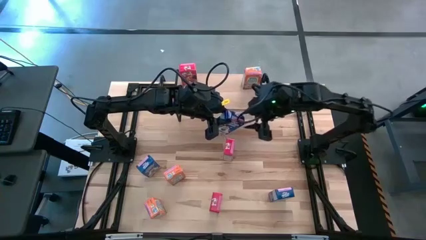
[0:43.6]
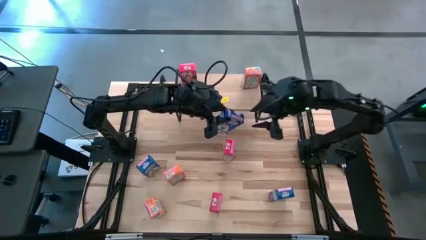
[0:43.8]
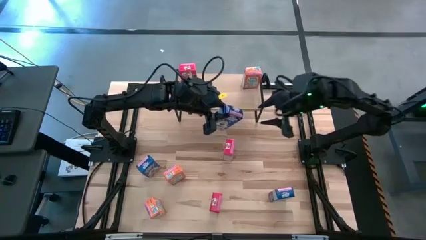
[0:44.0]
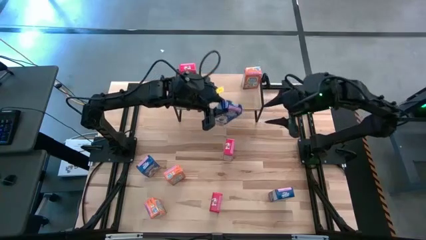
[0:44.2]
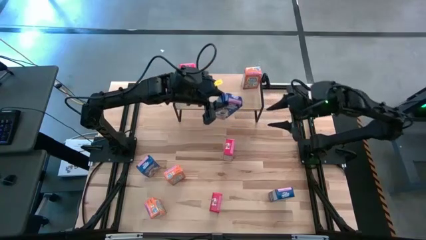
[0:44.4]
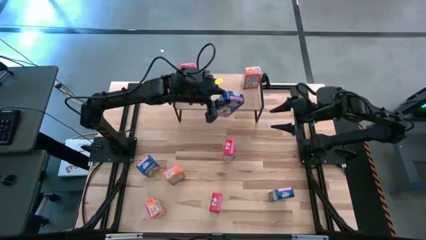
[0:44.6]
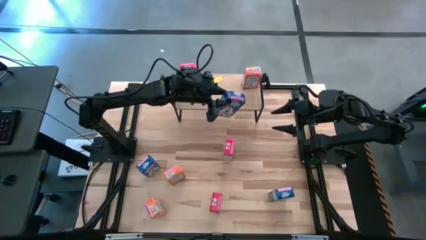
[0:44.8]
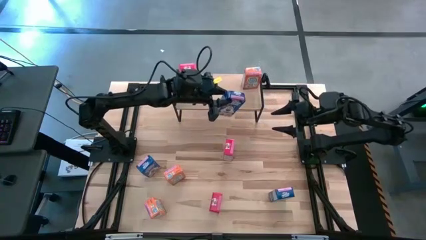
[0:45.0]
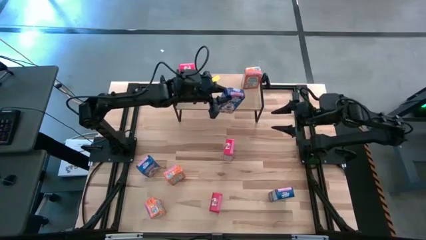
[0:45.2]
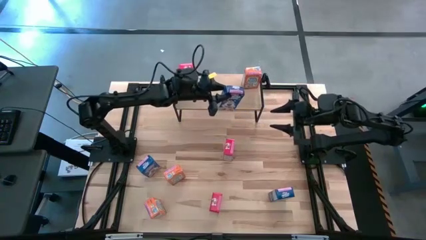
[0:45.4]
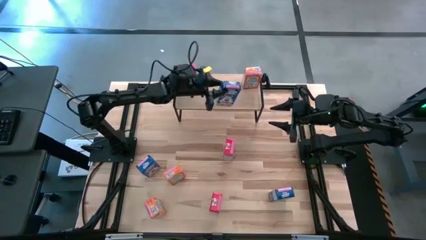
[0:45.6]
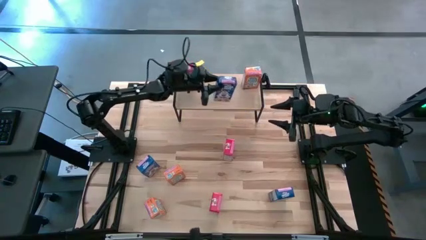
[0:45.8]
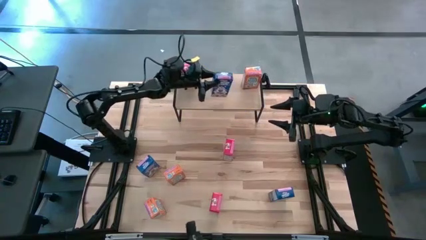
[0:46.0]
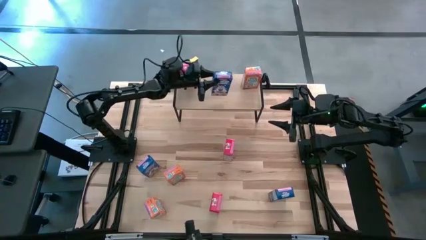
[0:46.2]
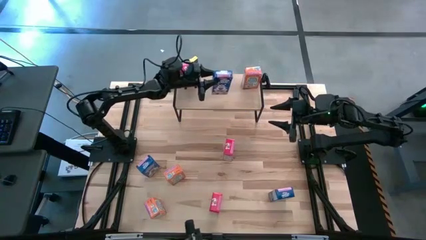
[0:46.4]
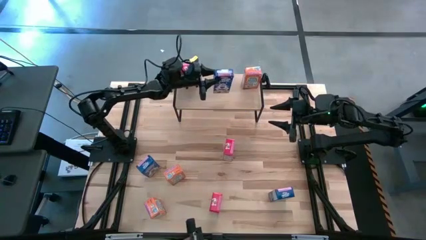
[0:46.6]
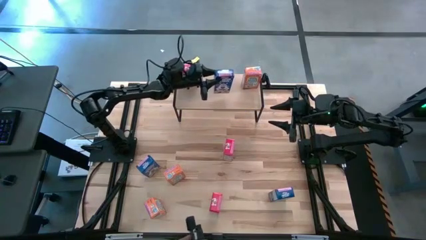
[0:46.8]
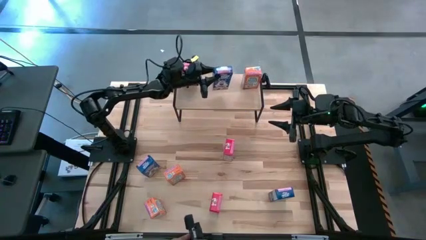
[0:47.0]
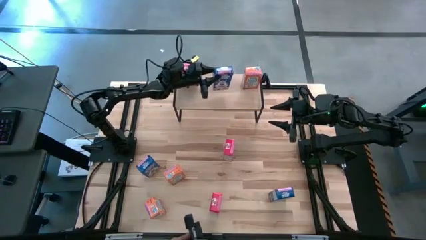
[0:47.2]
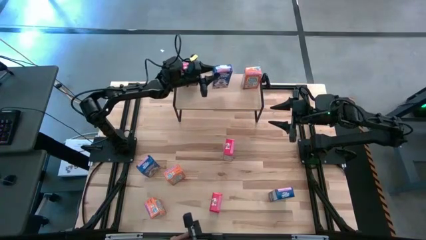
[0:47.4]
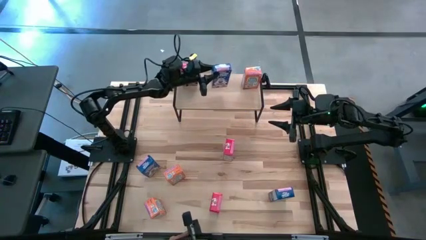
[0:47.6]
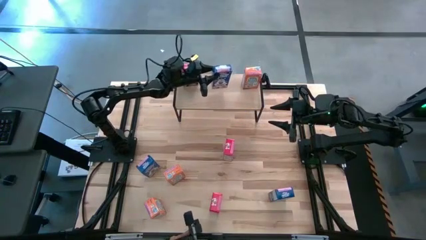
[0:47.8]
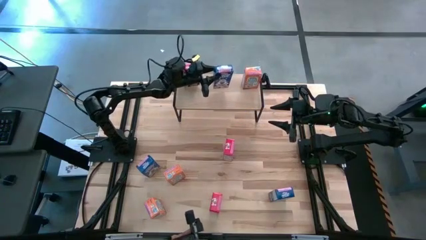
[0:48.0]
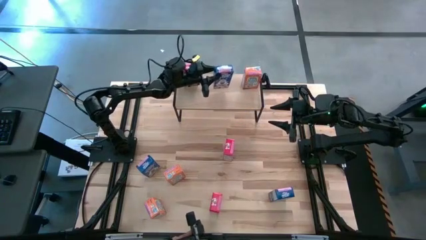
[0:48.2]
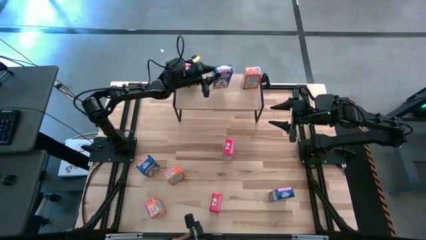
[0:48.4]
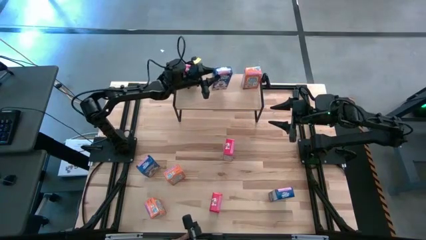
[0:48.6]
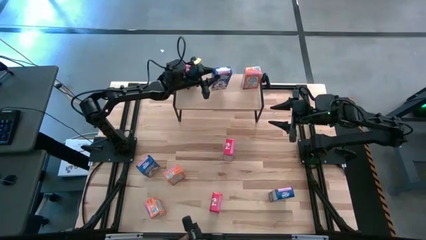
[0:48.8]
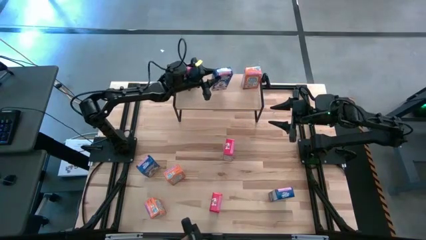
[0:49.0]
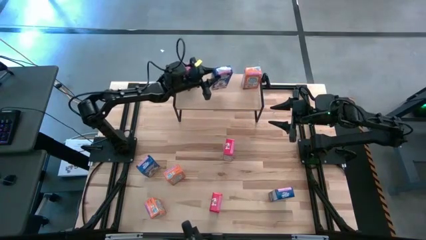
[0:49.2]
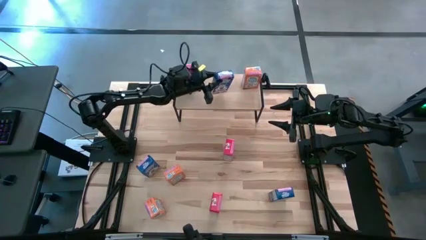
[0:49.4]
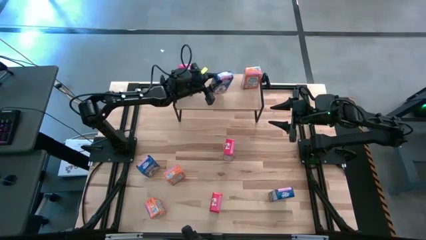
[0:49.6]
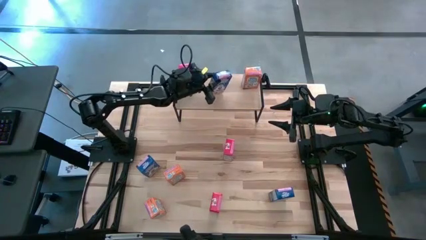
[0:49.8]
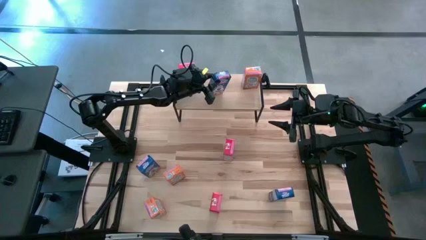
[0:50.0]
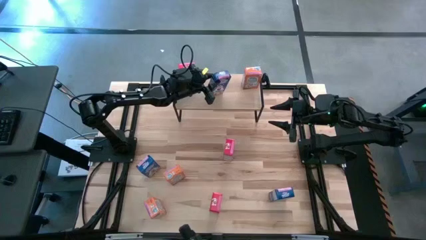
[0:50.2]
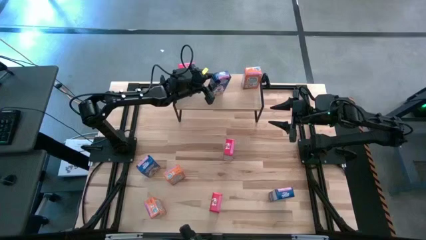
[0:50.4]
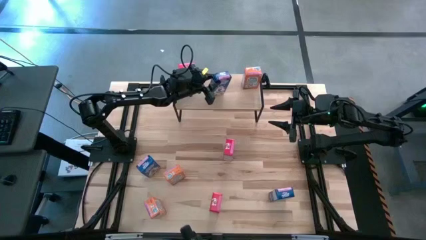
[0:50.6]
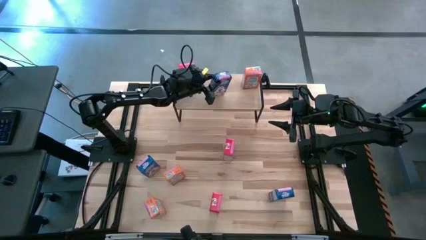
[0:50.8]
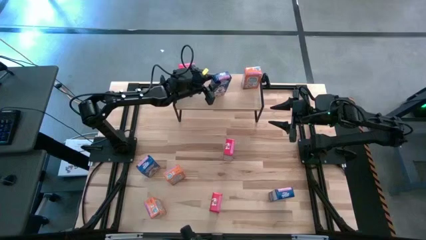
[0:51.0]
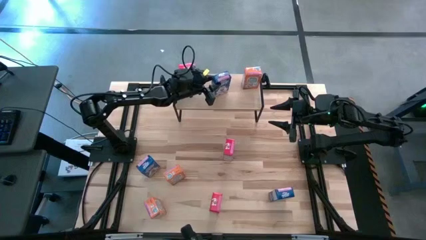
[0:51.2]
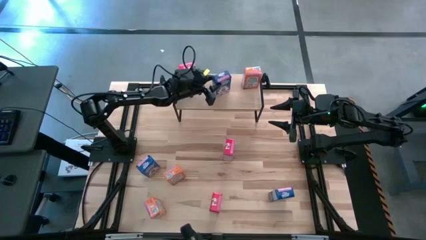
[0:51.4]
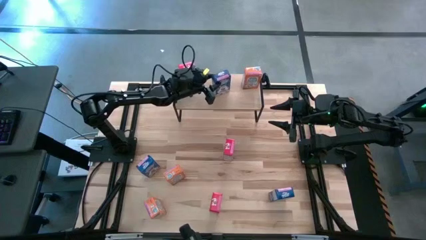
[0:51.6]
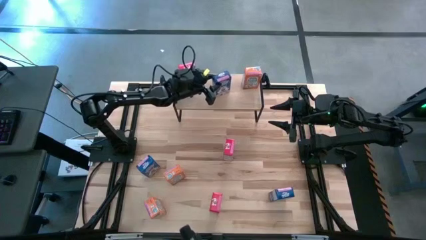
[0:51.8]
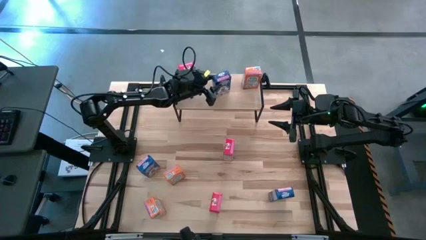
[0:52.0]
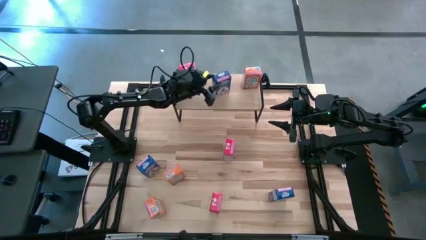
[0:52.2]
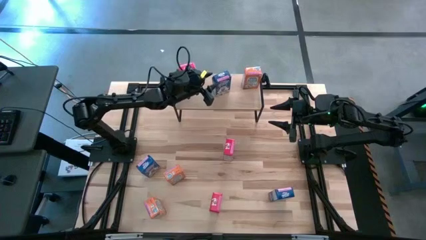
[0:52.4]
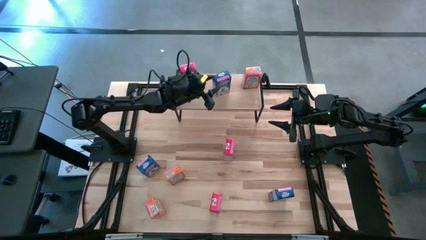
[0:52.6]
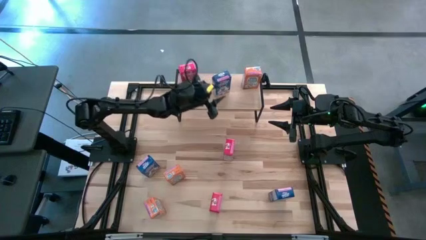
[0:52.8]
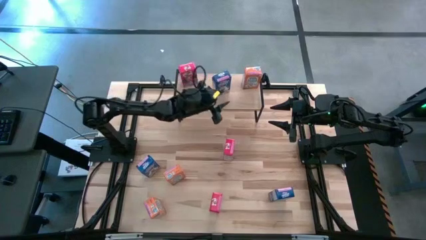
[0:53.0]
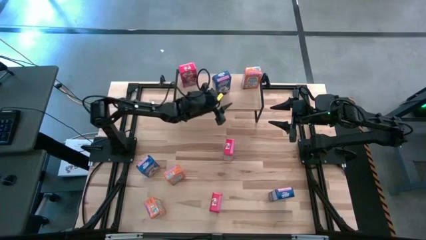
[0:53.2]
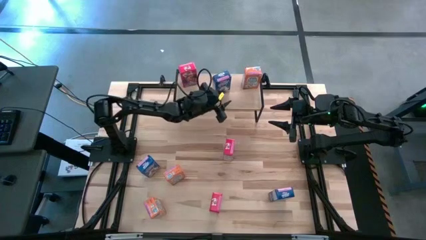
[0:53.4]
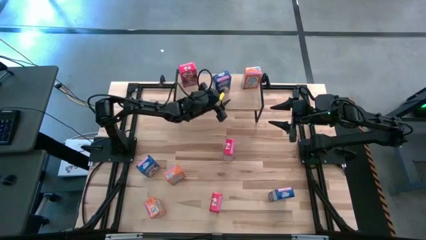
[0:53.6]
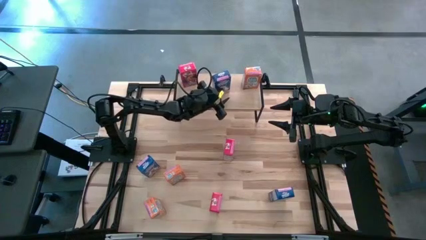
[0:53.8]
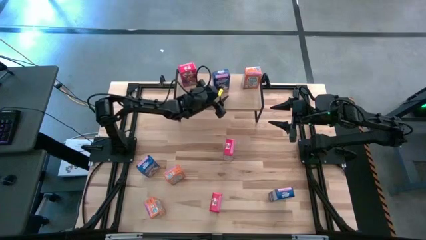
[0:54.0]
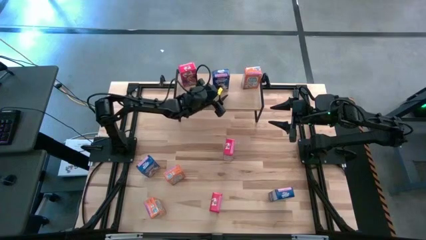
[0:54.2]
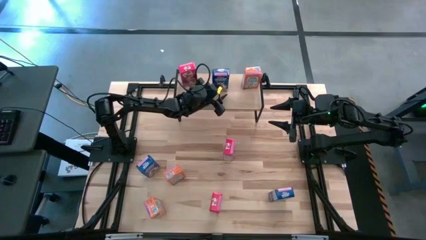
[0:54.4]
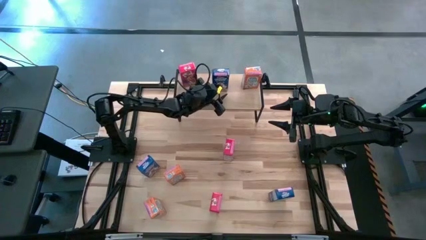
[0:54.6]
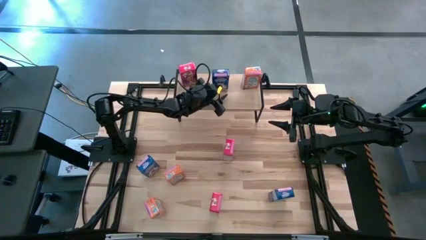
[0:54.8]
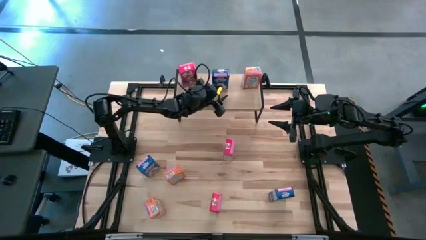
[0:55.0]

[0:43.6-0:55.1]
Task: Stack cereal on shelf
Put the top blue cereal box on the shelf
